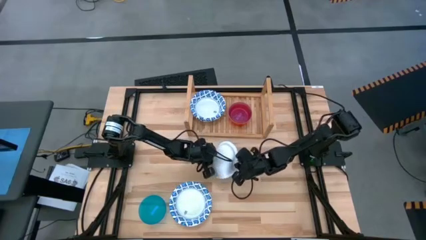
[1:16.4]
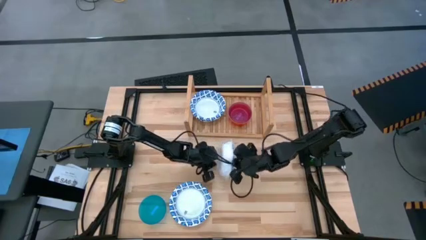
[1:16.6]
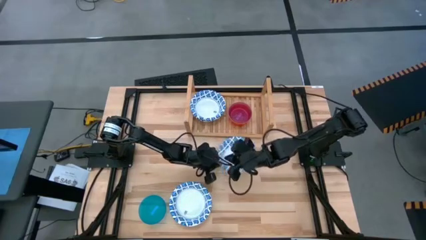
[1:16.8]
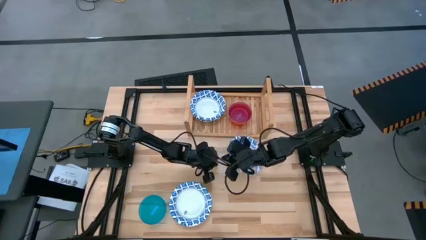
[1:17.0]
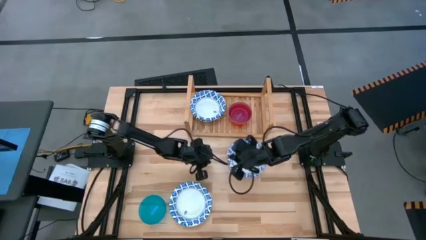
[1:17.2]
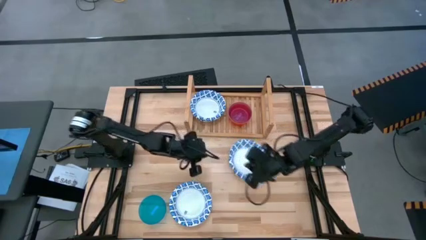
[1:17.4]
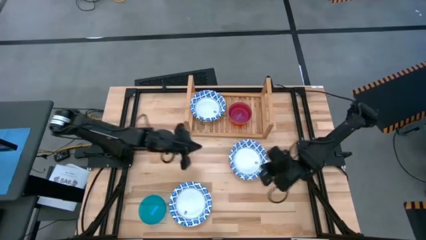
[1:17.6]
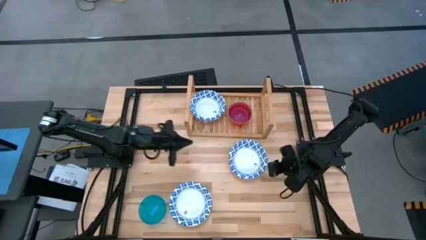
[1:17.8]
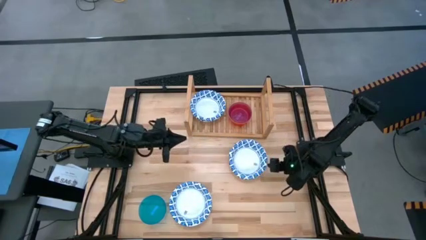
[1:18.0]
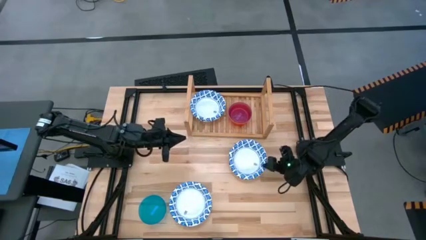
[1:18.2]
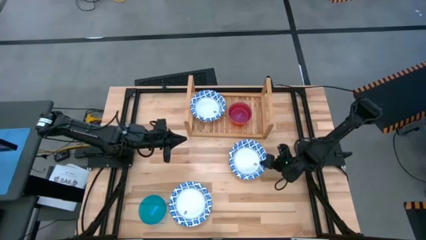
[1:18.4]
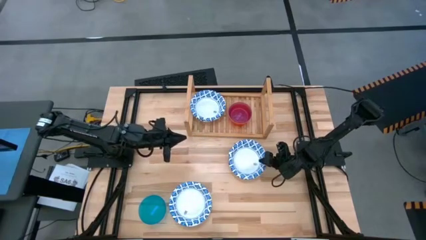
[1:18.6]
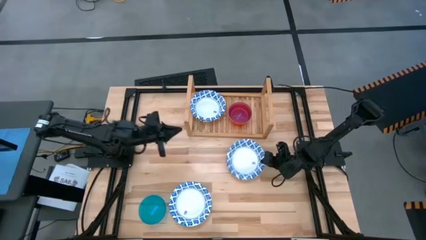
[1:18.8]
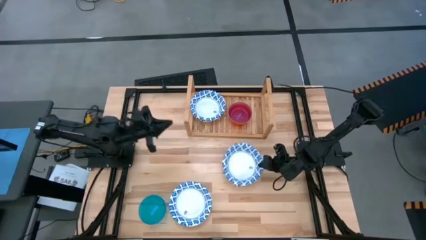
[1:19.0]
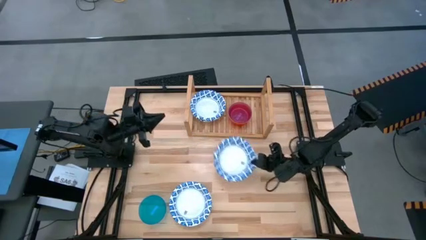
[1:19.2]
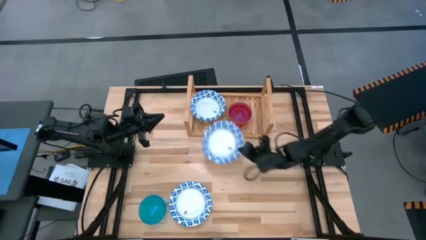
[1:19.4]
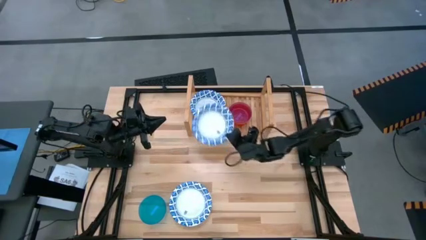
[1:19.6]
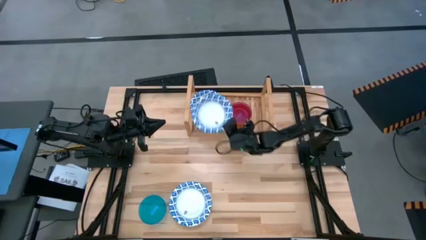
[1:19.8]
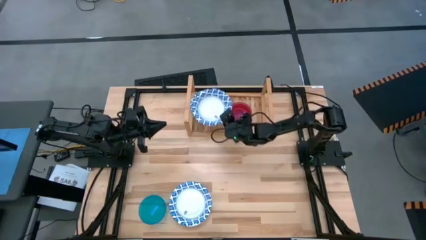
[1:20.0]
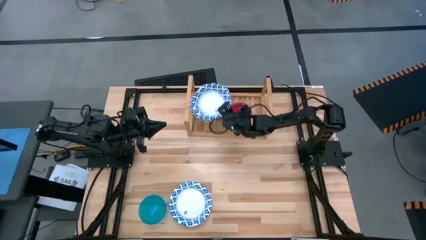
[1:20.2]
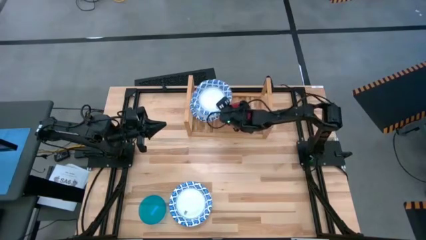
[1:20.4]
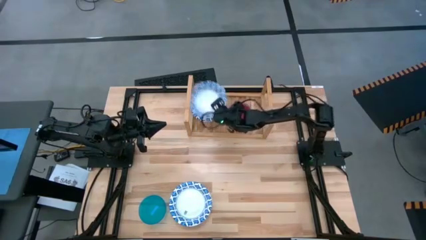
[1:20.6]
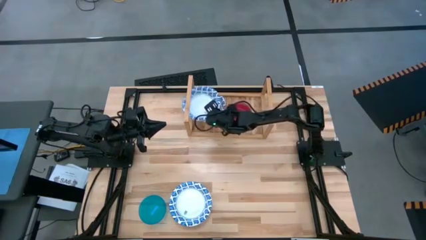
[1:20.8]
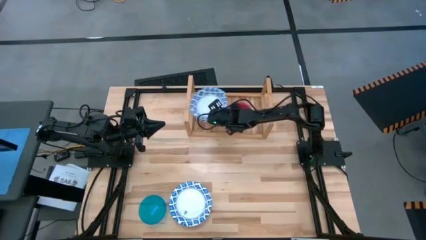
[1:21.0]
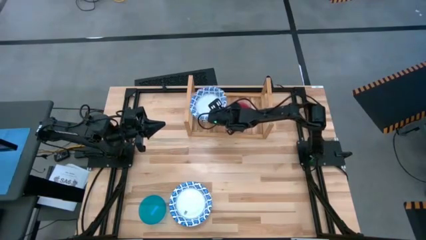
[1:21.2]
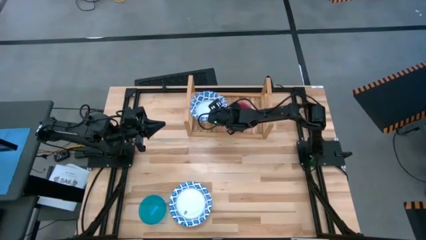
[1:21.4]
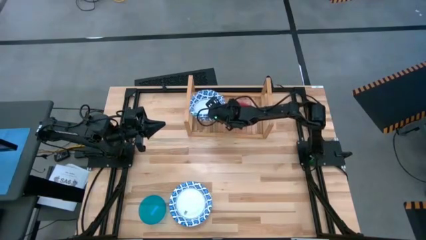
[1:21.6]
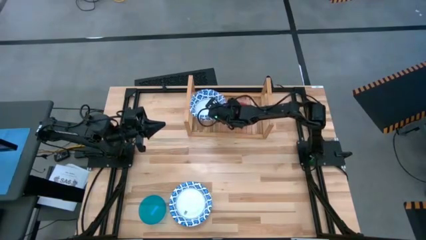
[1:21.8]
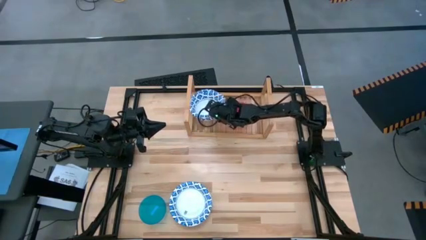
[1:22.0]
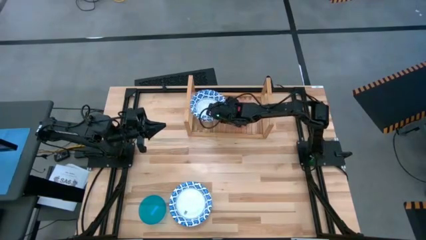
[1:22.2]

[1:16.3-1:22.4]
Task: Place and stack bowls onto a shelf
Stack the top blue pattern bowl on top of the other blue pattern bowl on the shelf

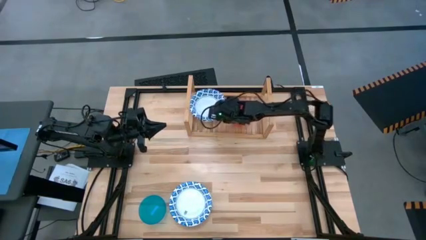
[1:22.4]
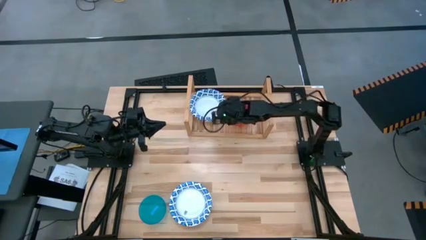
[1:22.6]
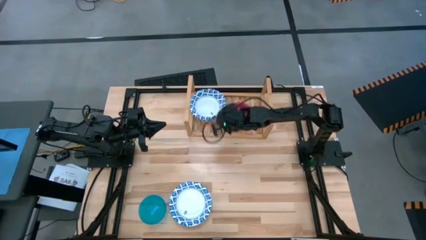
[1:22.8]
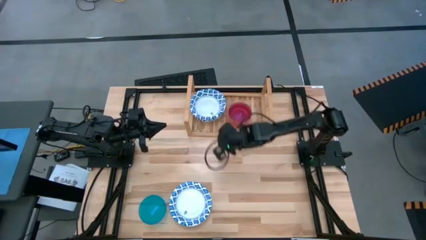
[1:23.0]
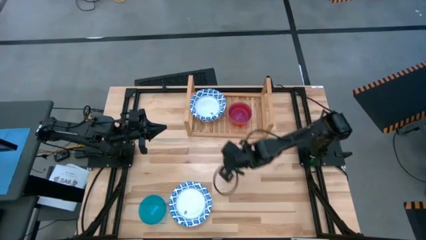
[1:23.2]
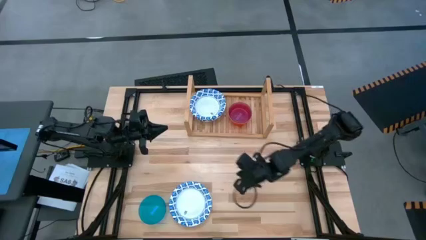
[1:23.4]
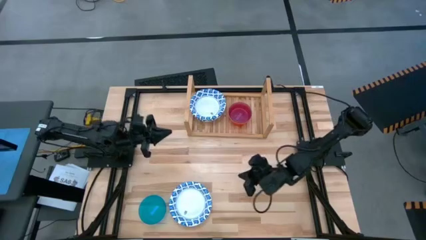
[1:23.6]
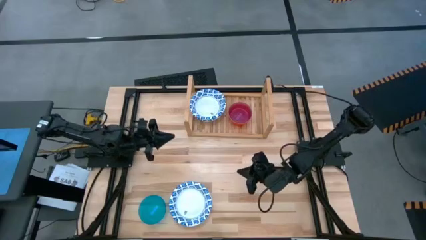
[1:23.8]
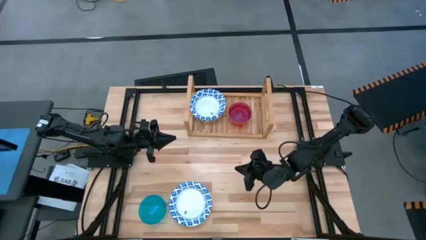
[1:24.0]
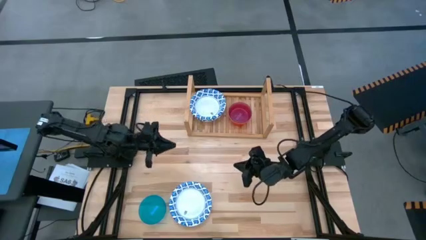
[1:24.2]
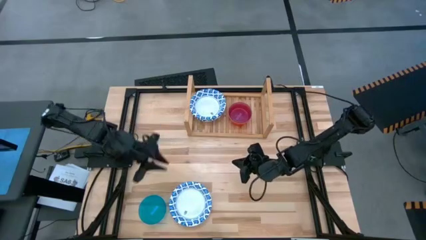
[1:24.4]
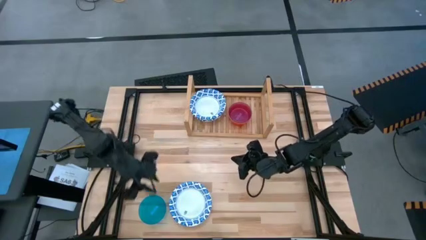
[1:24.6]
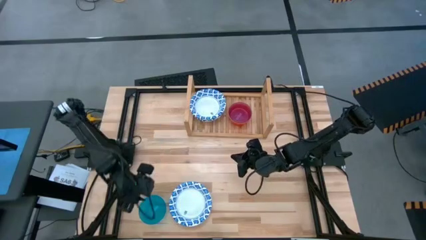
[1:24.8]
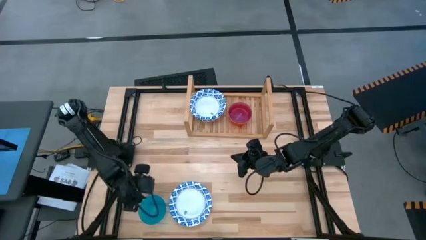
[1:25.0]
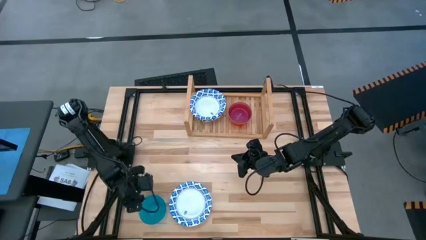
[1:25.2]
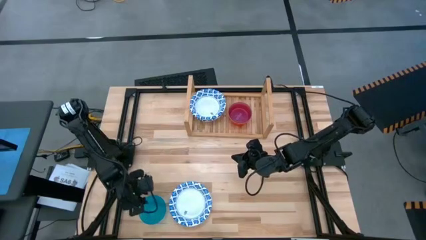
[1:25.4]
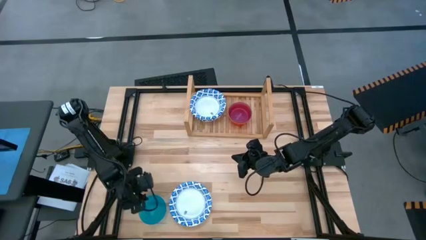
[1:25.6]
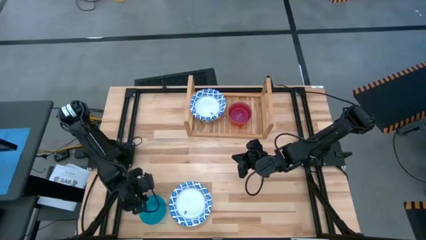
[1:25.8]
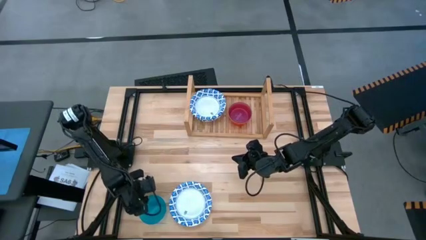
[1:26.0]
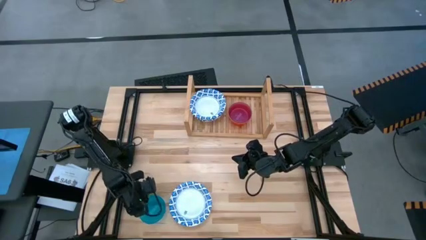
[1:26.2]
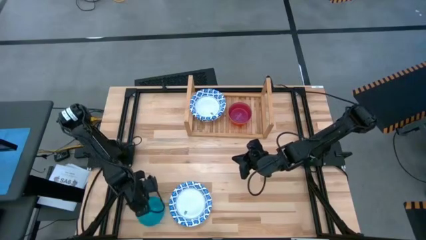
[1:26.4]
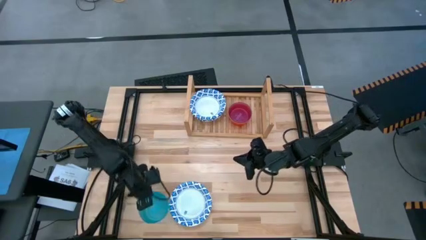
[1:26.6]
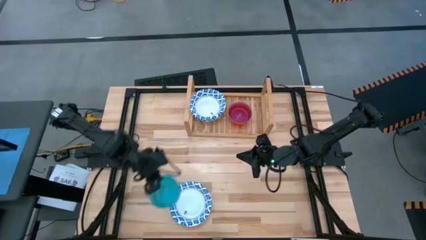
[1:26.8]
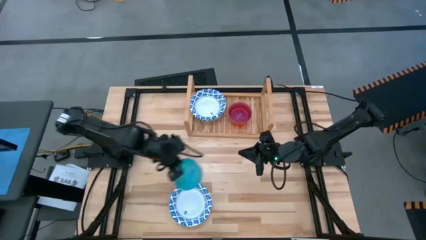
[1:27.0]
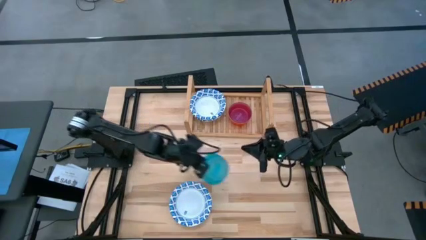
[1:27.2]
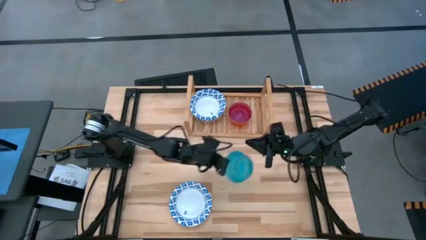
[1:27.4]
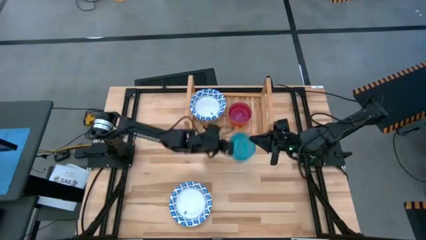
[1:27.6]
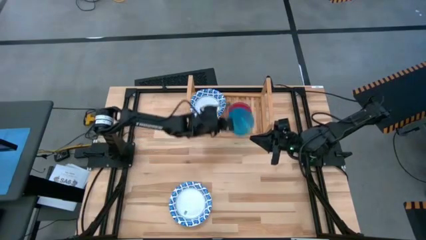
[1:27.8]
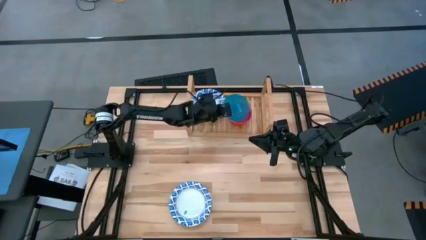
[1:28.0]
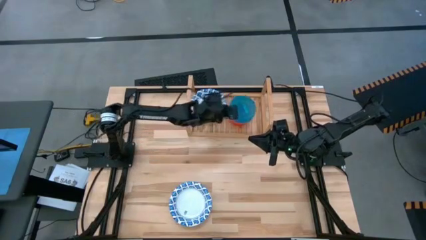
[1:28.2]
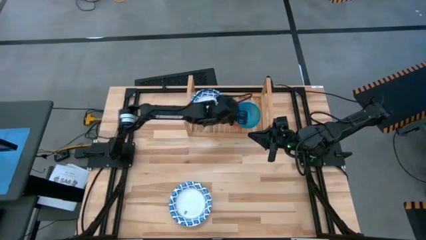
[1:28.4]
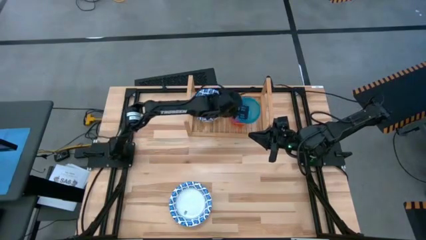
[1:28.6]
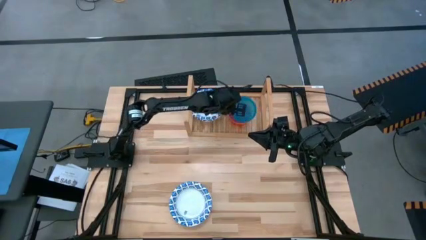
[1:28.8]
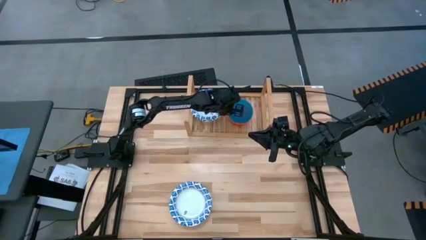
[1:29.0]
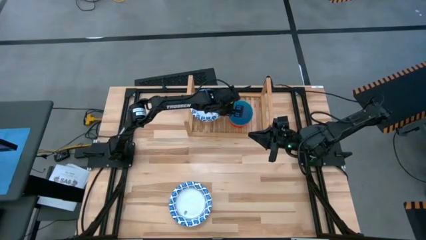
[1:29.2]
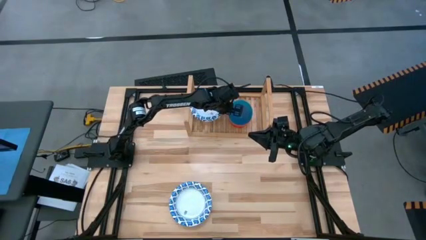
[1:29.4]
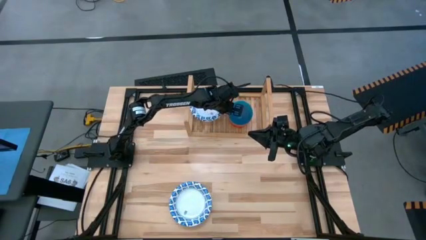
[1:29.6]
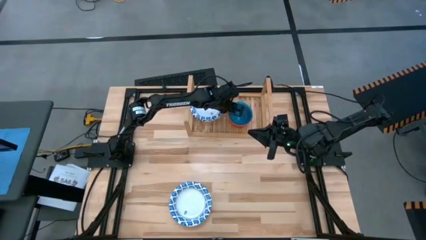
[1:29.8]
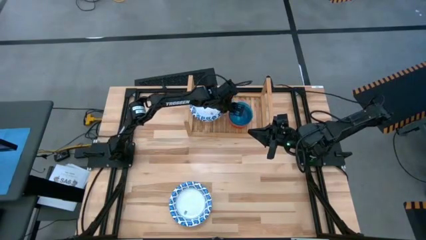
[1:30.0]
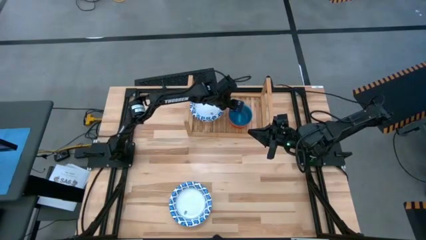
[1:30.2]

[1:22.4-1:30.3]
Stack the blue bowl on top of the red bowl on the shelf

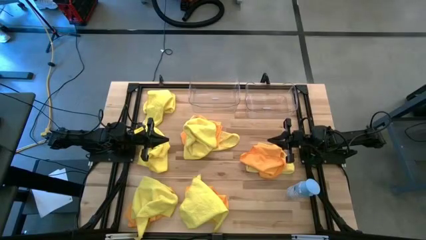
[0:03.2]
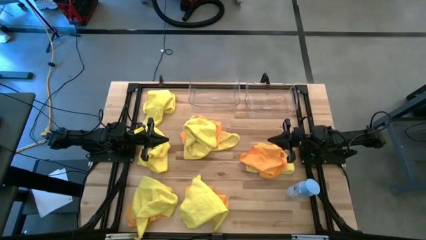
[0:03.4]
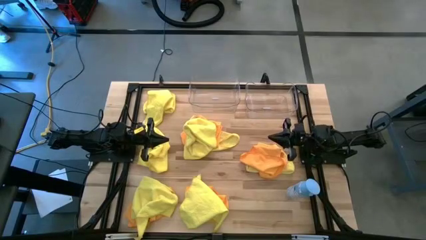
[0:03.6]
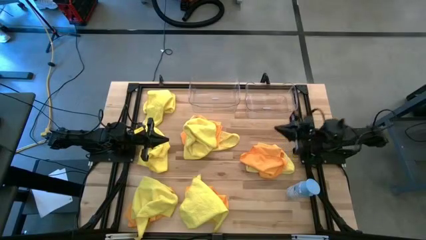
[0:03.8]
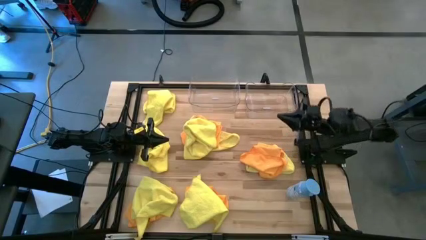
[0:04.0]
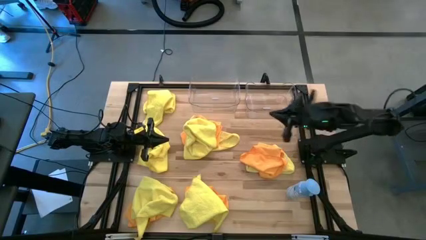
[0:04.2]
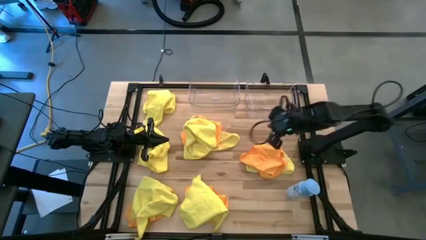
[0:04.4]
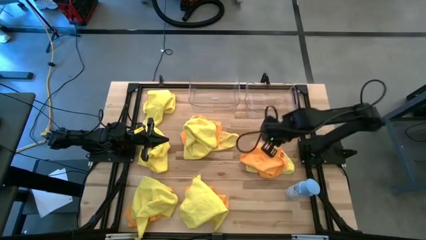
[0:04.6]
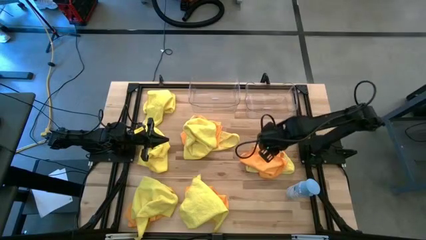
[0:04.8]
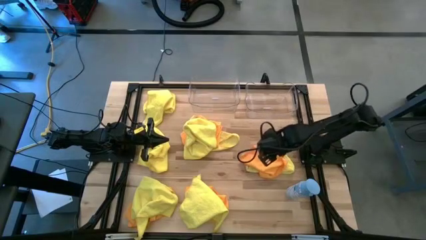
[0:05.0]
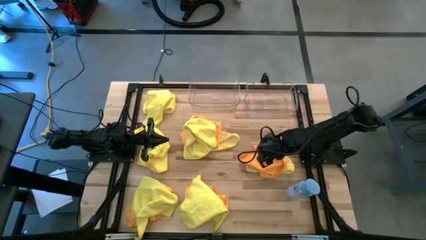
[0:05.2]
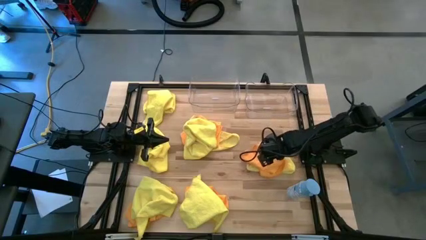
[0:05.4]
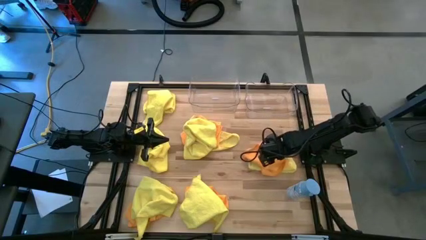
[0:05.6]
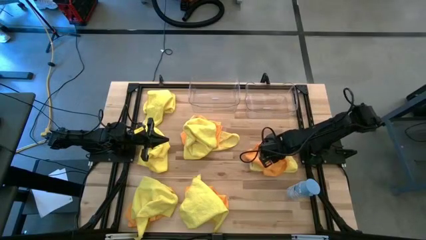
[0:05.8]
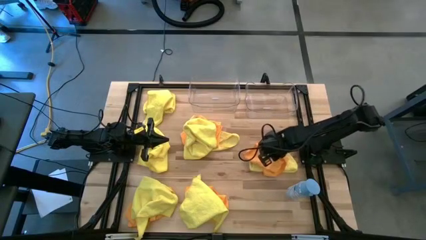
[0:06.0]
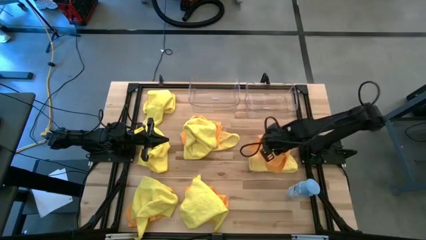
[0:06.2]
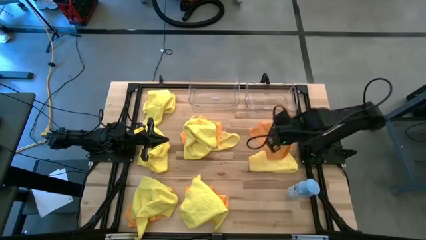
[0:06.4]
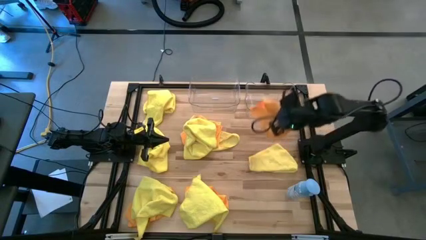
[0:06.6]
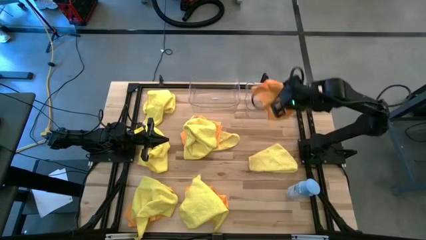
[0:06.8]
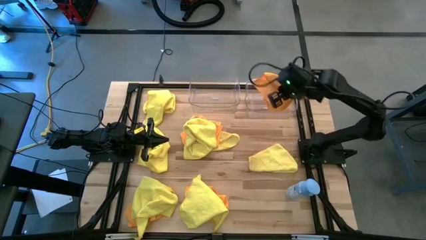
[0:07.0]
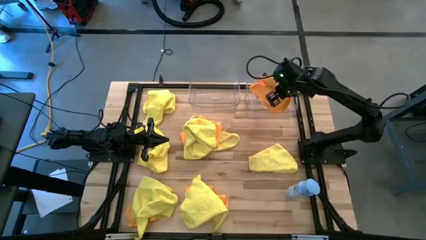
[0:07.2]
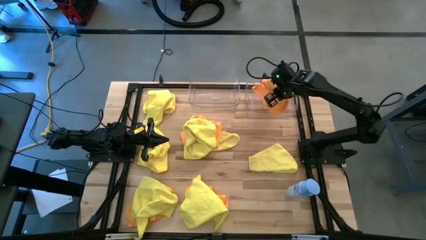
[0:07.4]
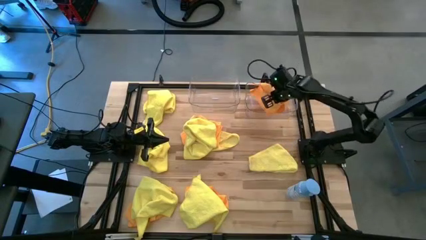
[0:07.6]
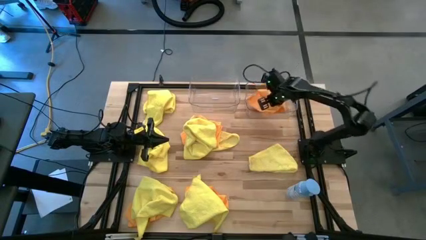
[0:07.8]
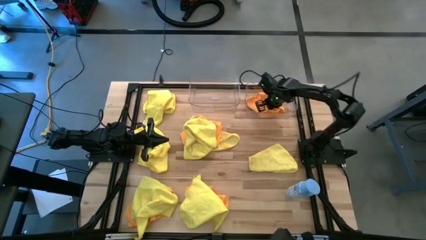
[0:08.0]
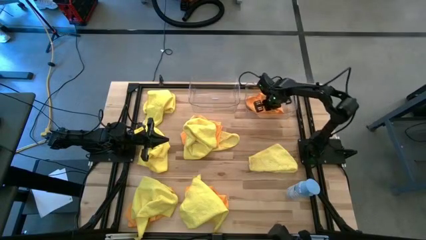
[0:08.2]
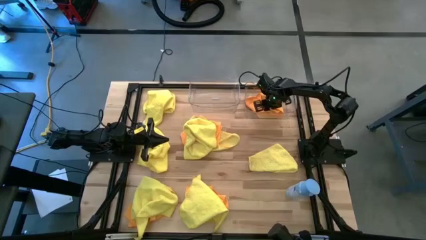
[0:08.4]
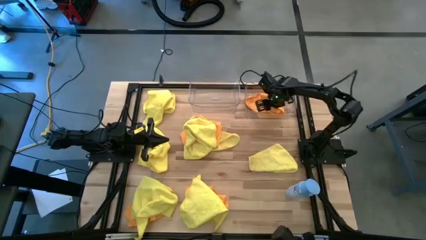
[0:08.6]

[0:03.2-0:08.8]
Task: Sort microfiber towel by color & place in baskets
Put the orange microfiber cloth into the right transparent bin
